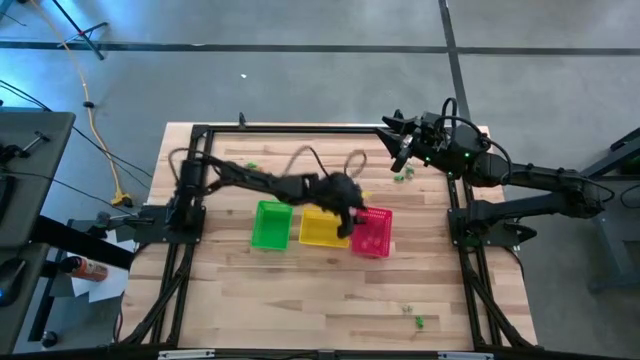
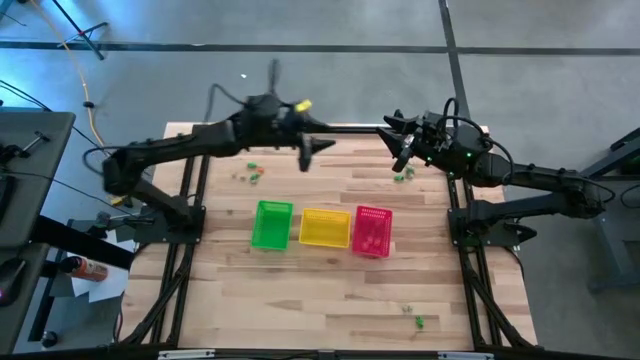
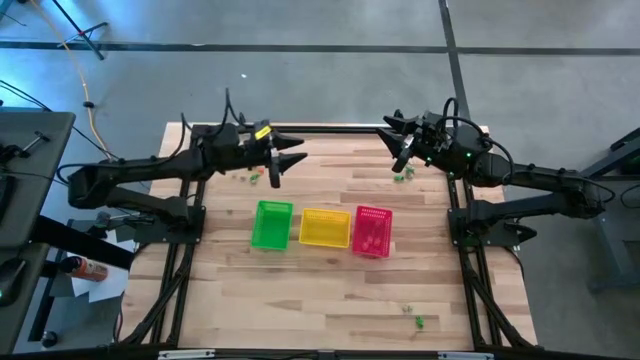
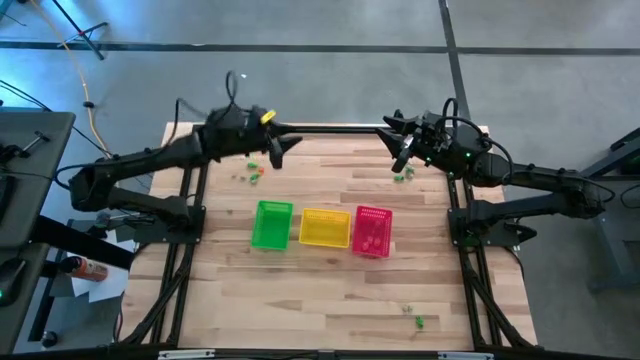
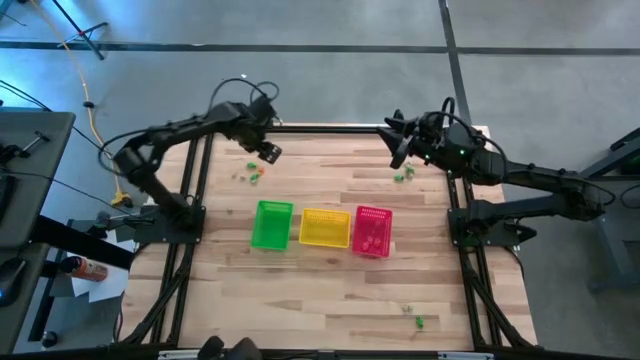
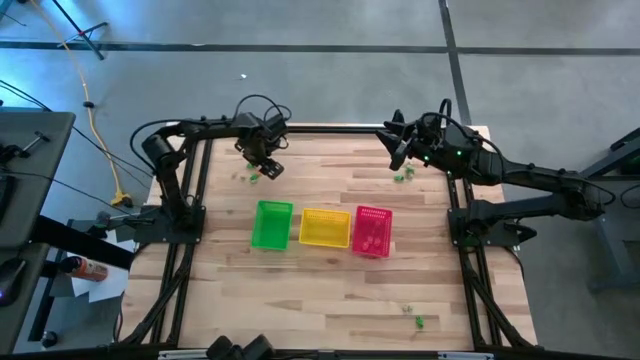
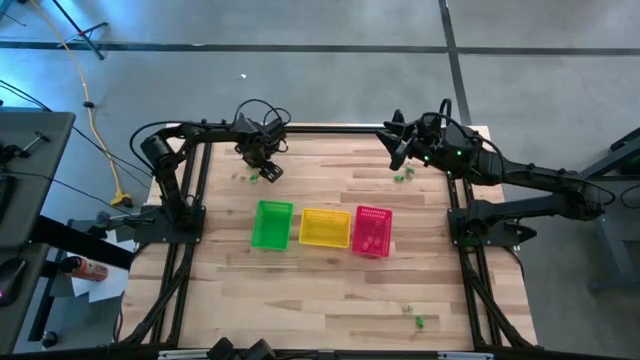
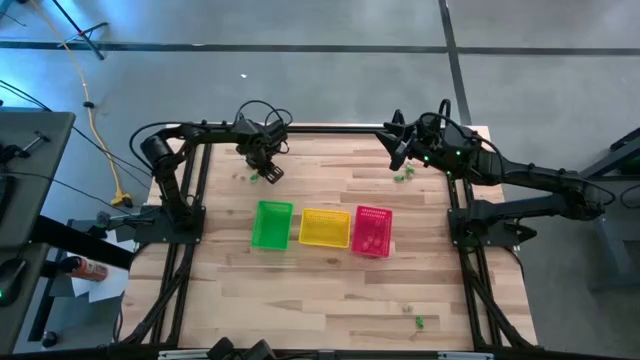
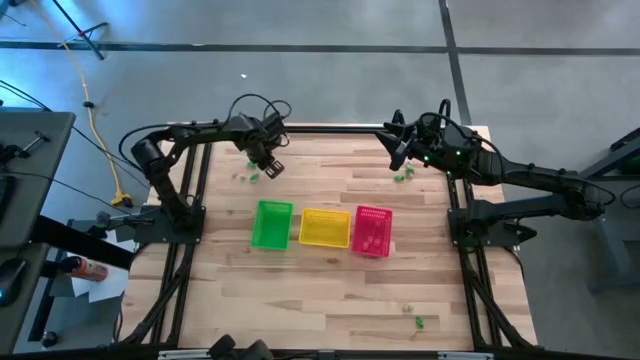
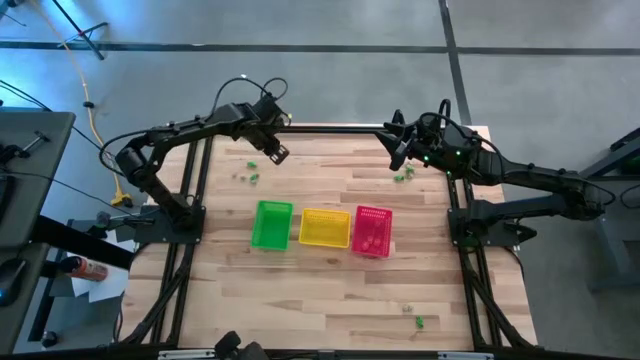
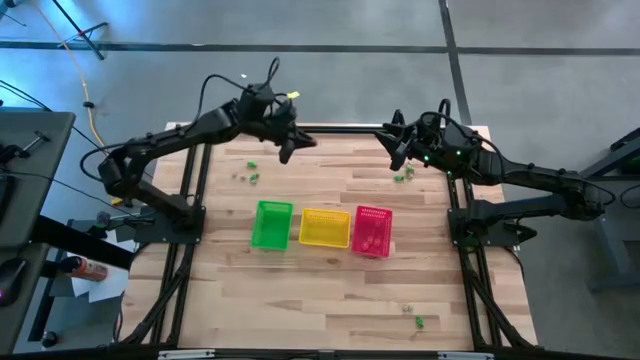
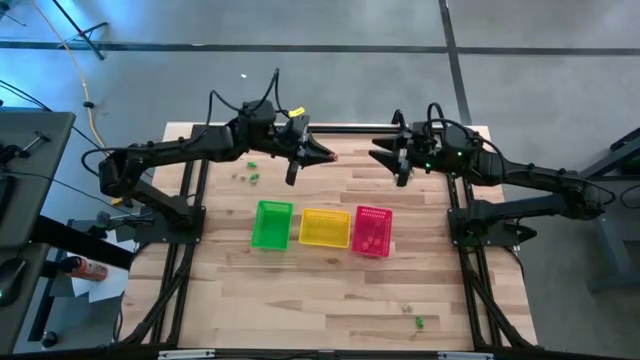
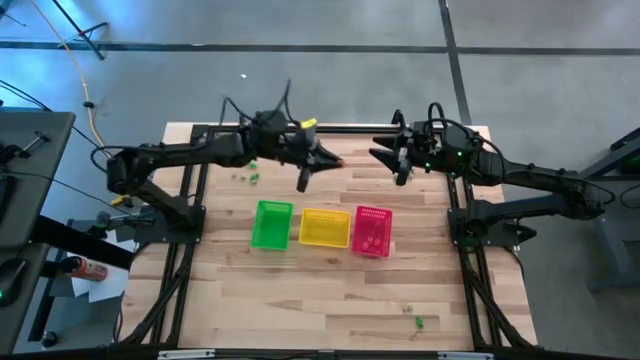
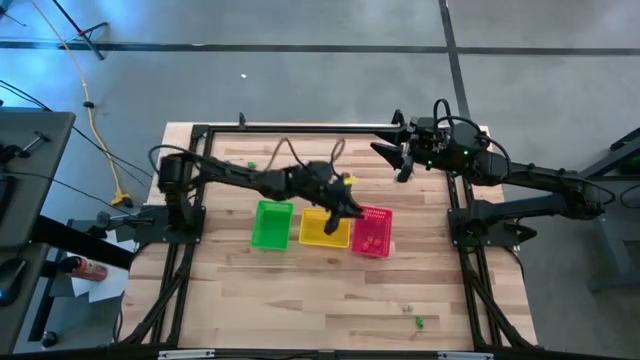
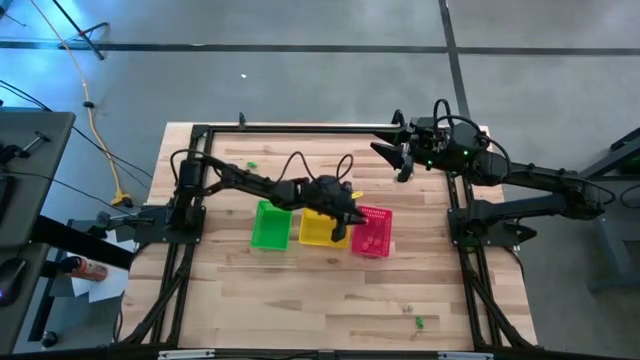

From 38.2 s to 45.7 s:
Task: Sort Halloween decoration
Put the orange pumpkin toy into the red basket

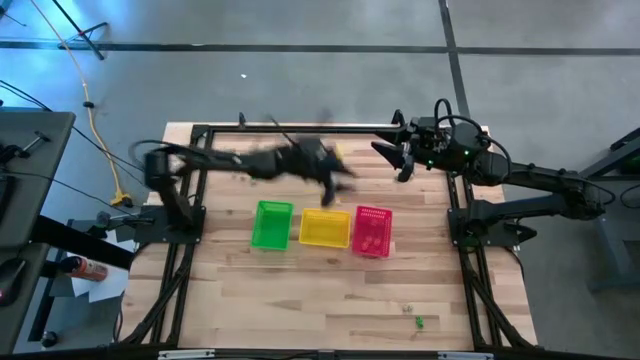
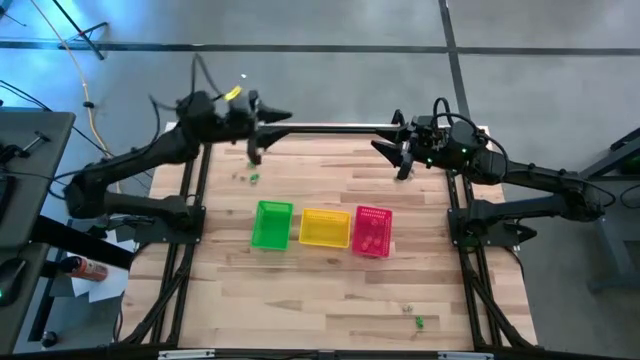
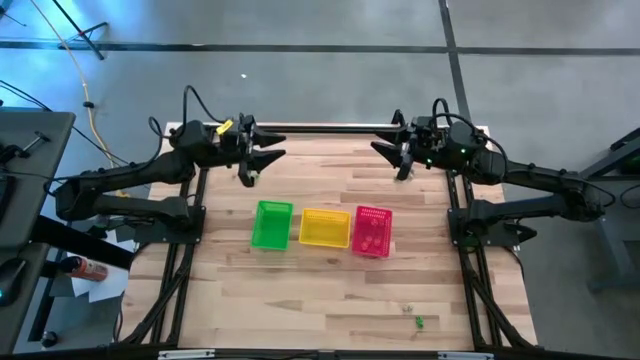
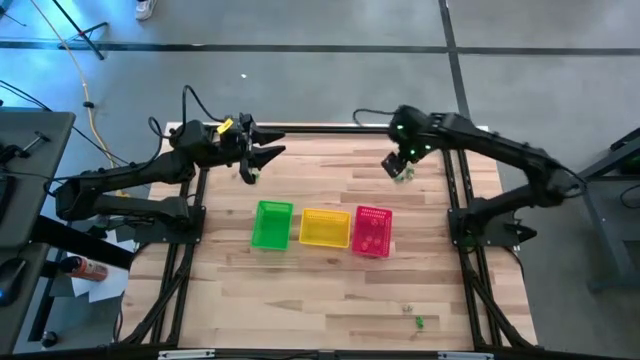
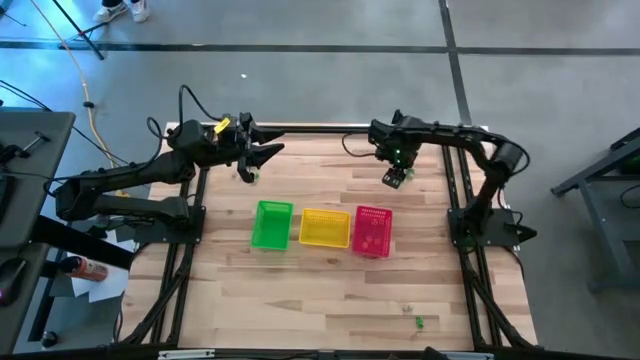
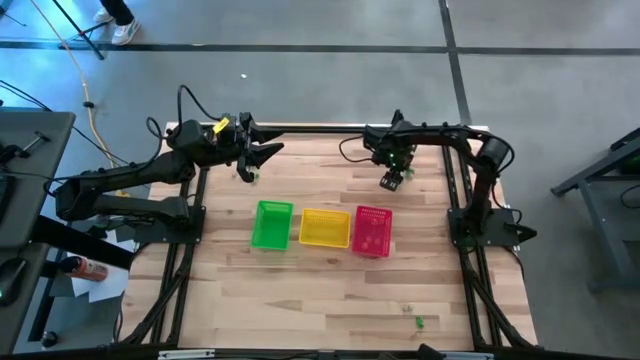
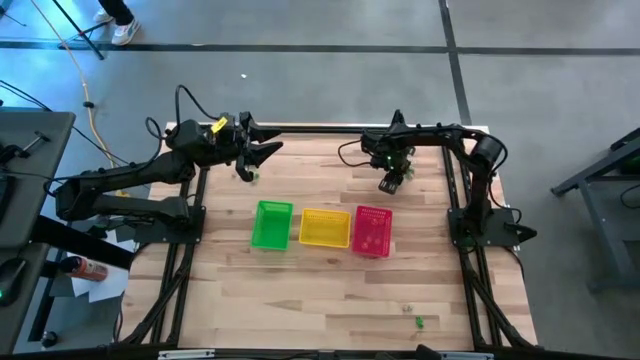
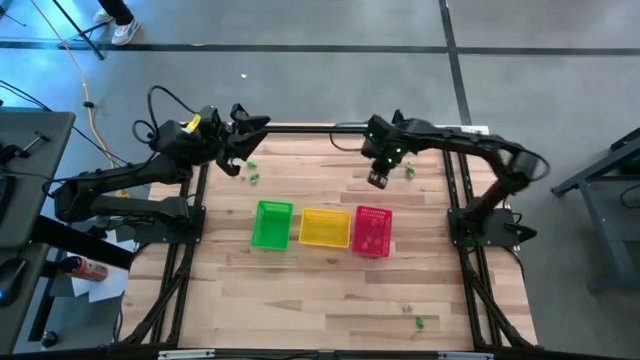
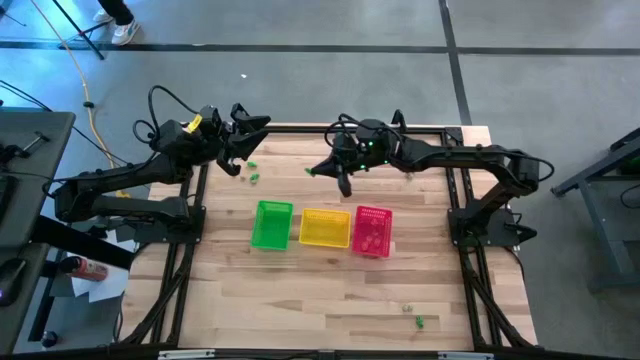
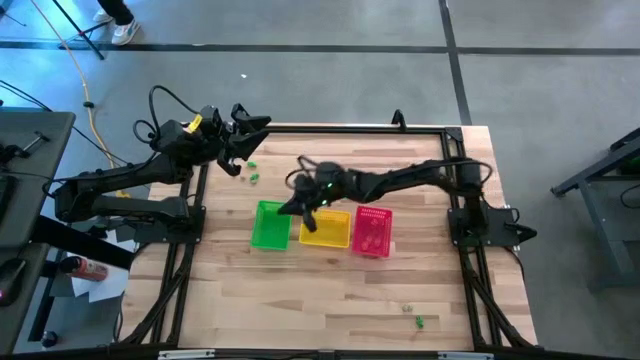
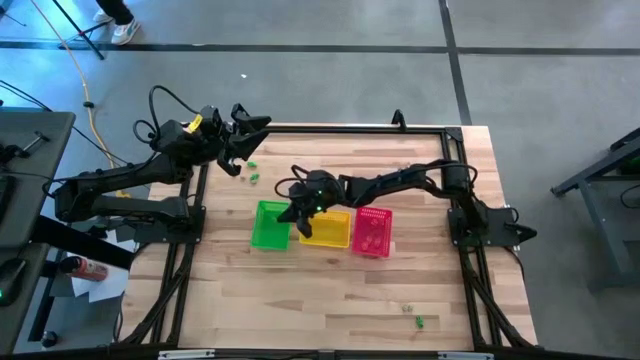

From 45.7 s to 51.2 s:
Put the green skeleton toy into the green basket

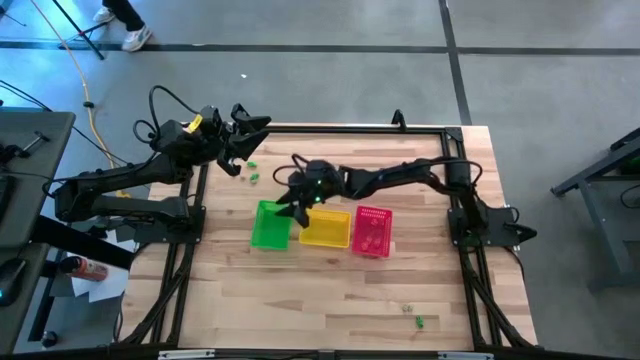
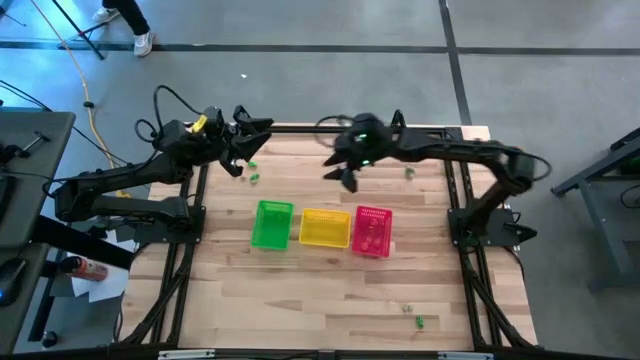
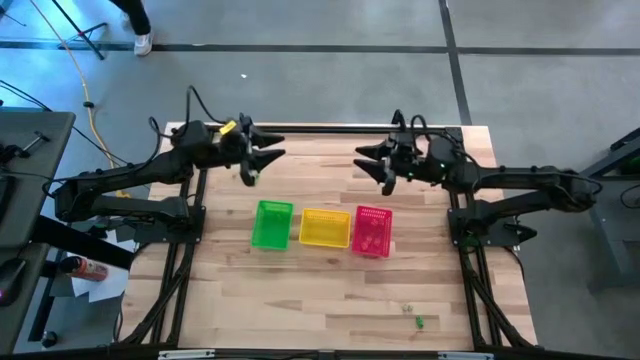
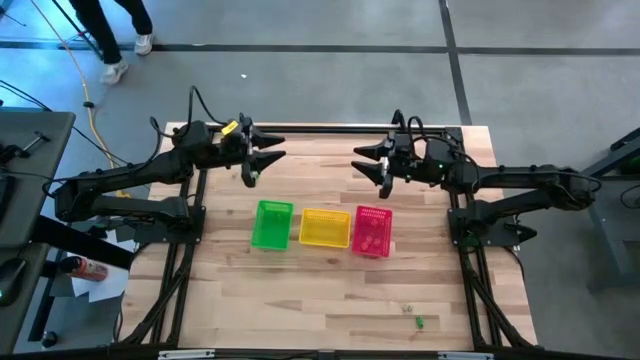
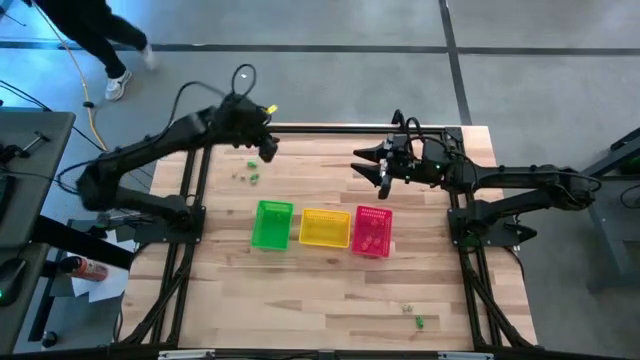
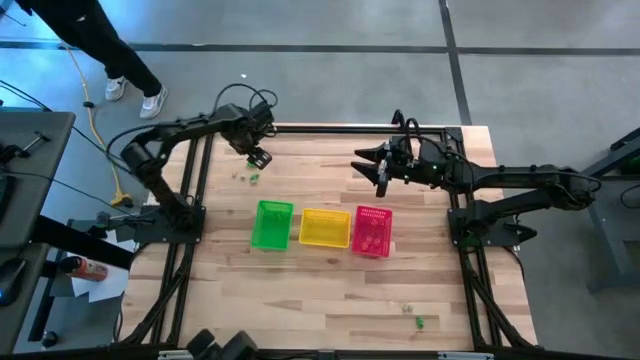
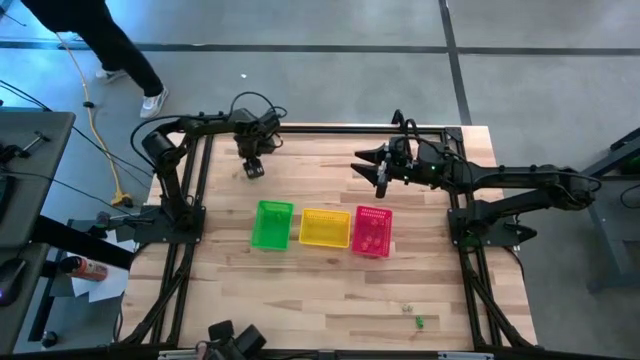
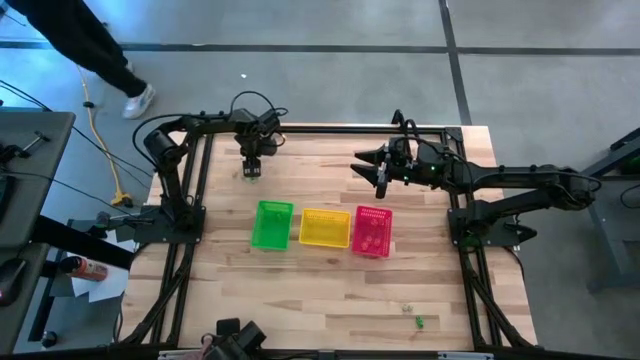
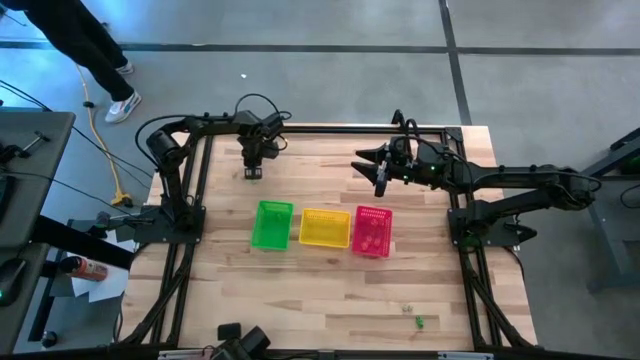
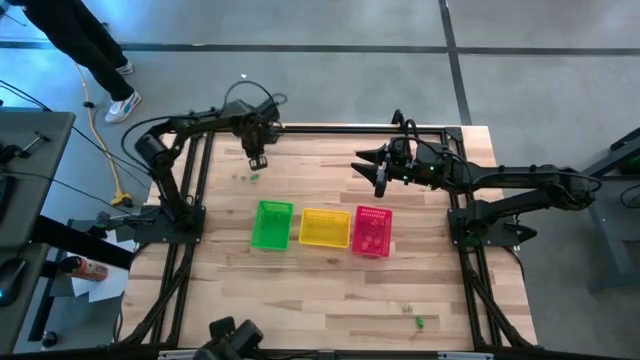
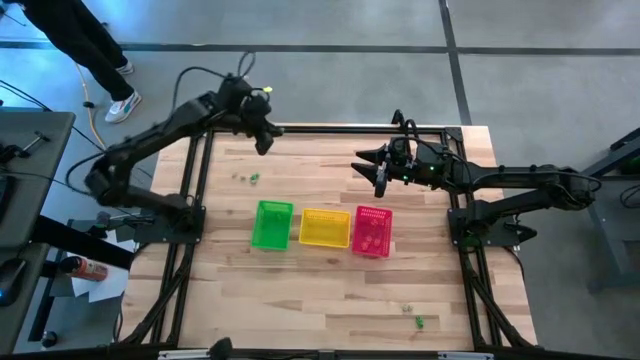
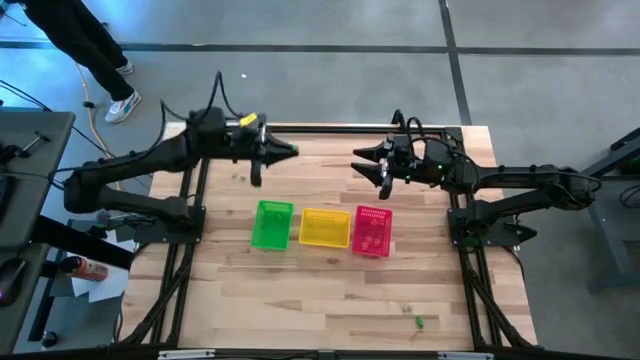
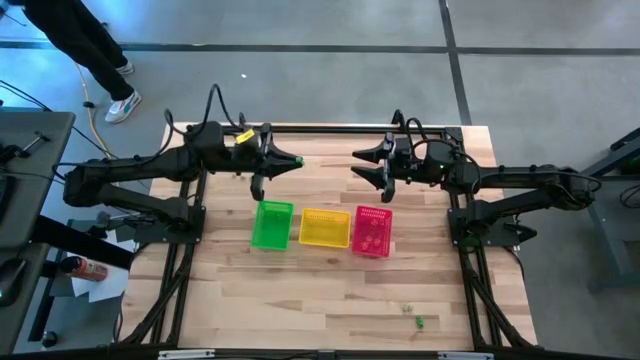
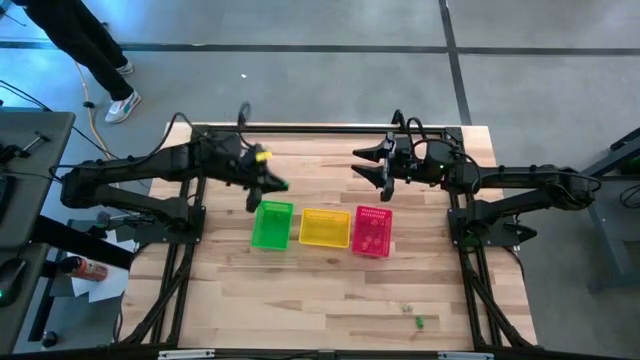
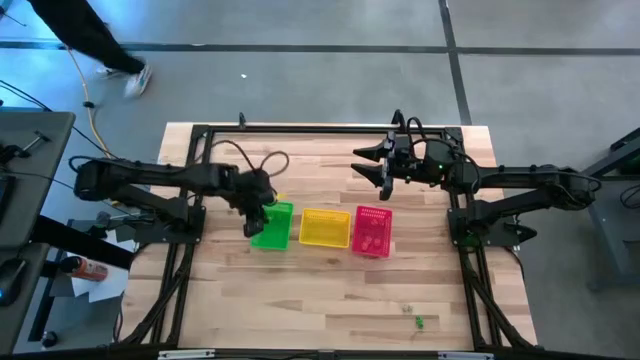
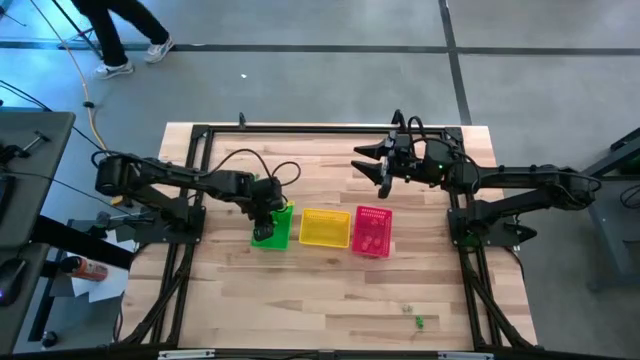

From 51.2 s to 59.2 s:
Put the green skeleton toy into the green basket
